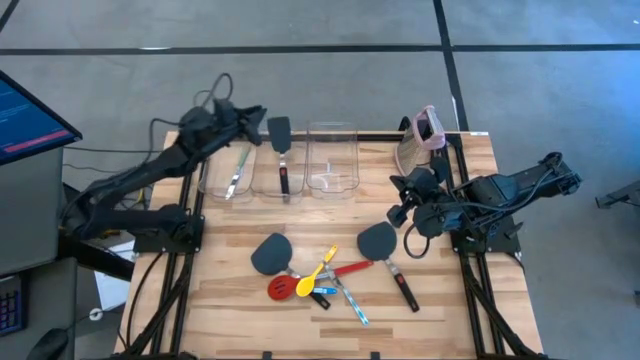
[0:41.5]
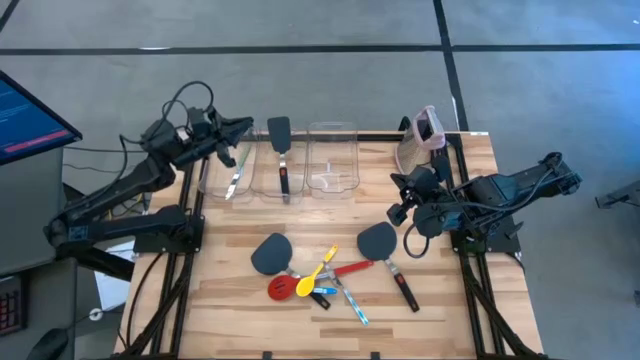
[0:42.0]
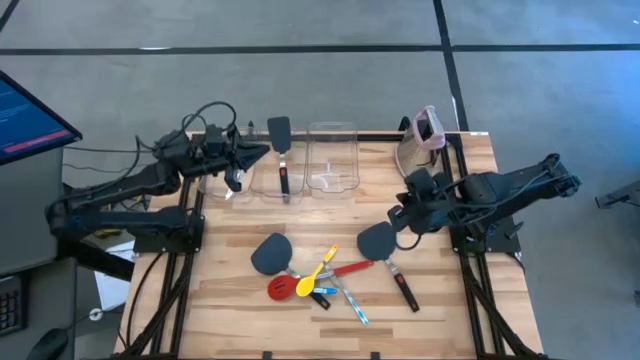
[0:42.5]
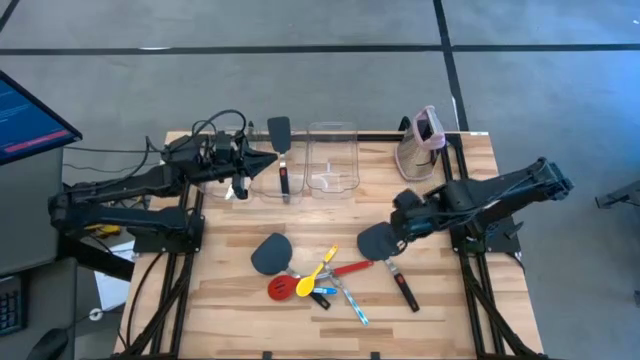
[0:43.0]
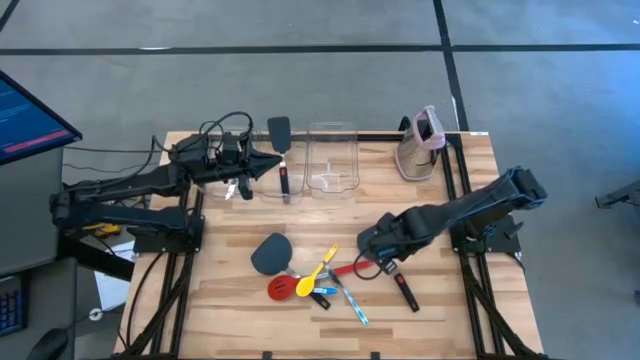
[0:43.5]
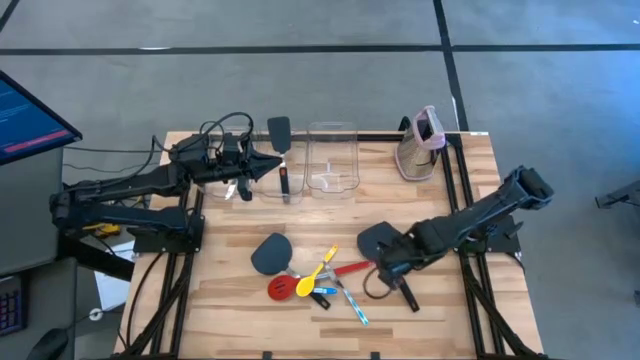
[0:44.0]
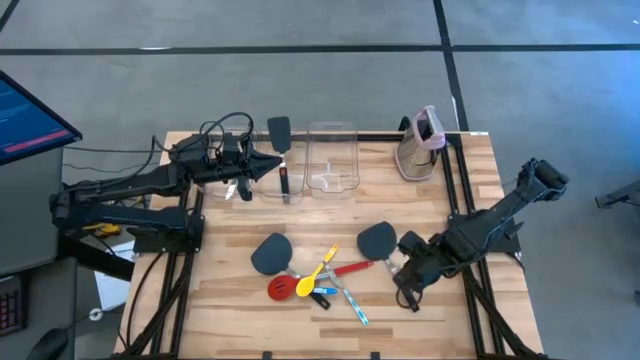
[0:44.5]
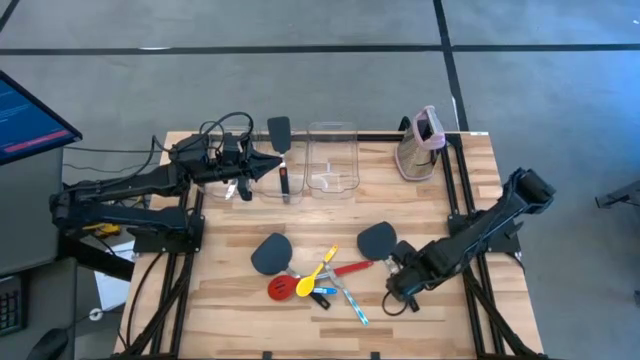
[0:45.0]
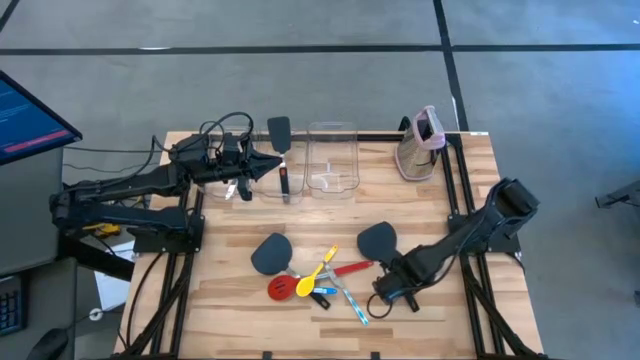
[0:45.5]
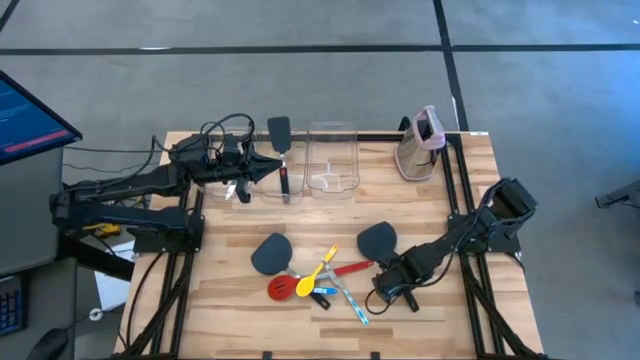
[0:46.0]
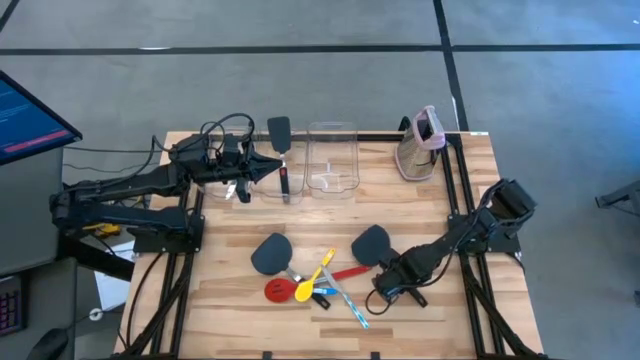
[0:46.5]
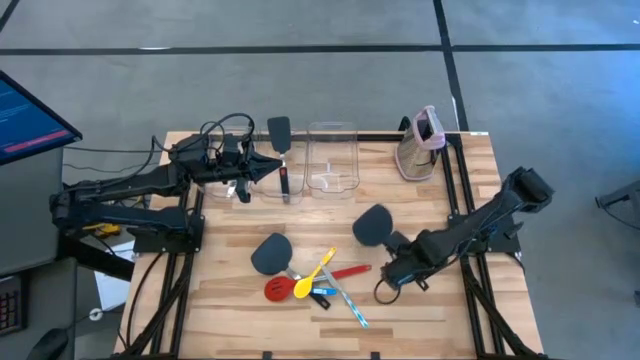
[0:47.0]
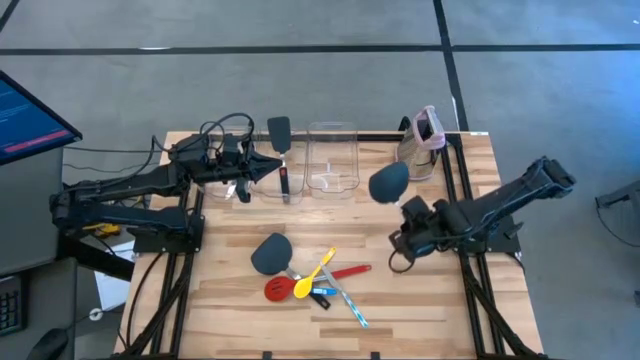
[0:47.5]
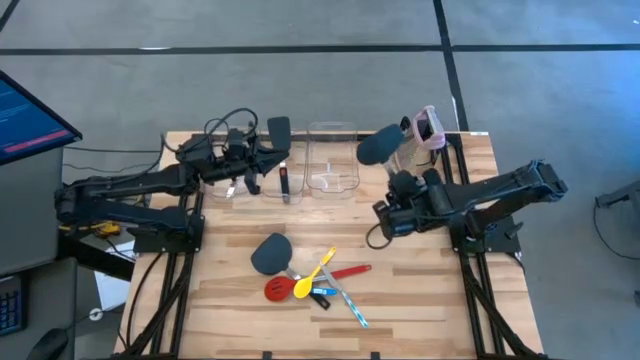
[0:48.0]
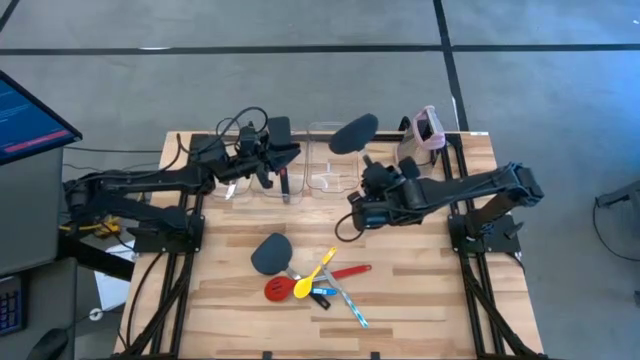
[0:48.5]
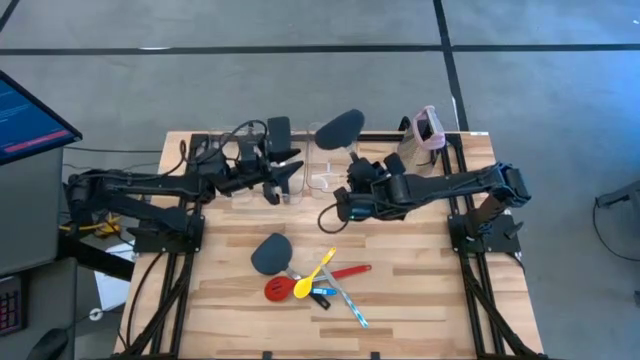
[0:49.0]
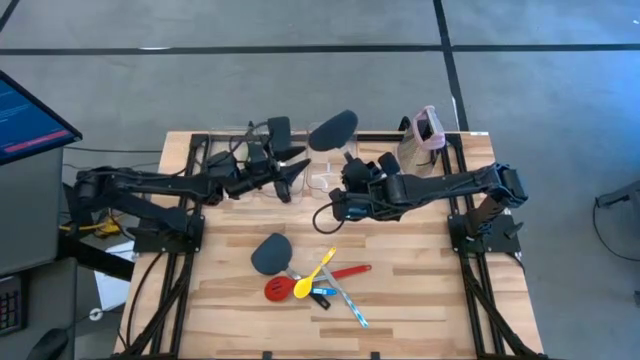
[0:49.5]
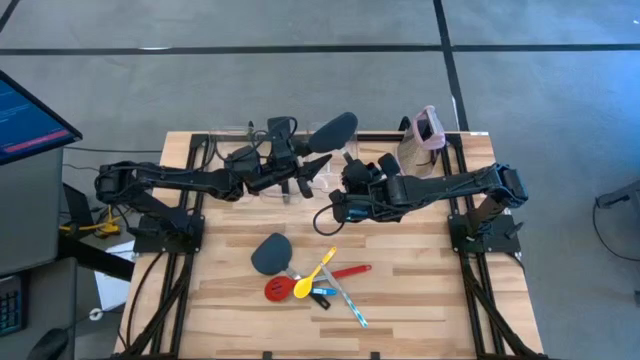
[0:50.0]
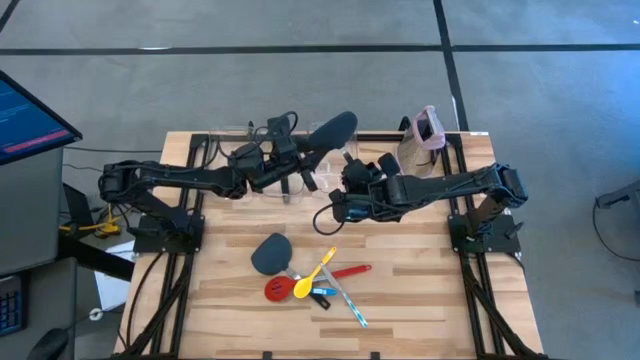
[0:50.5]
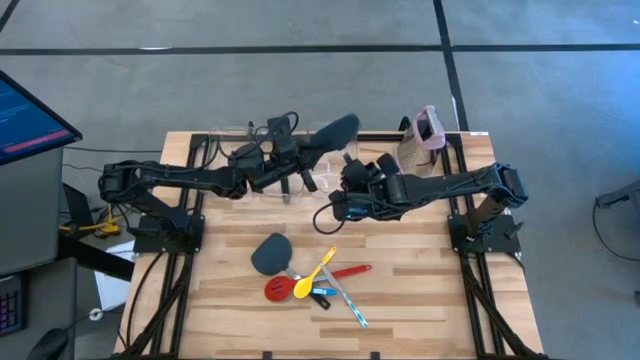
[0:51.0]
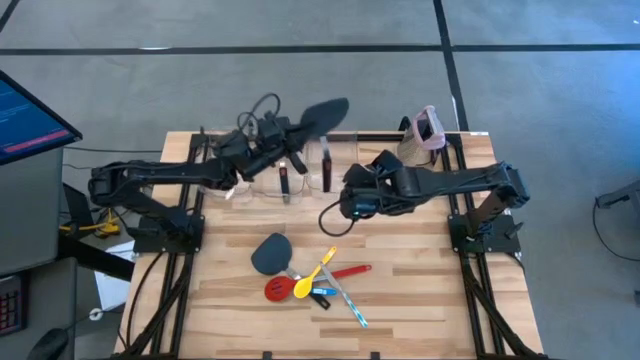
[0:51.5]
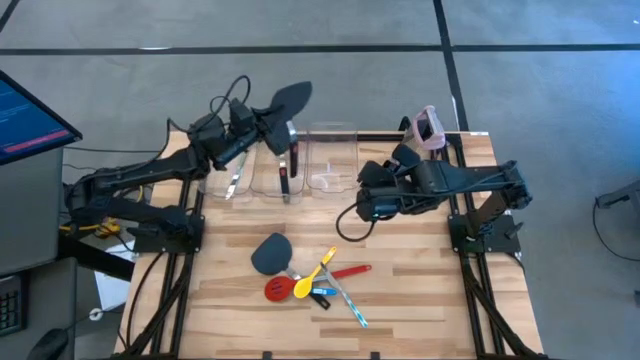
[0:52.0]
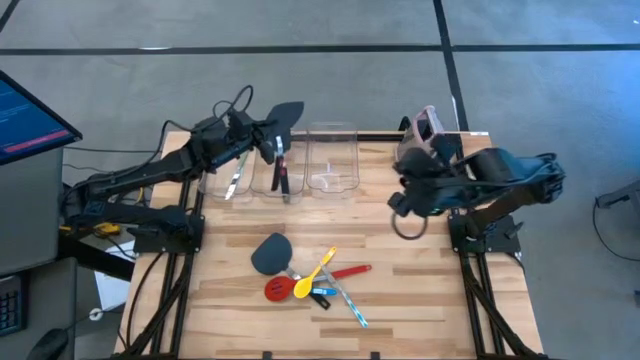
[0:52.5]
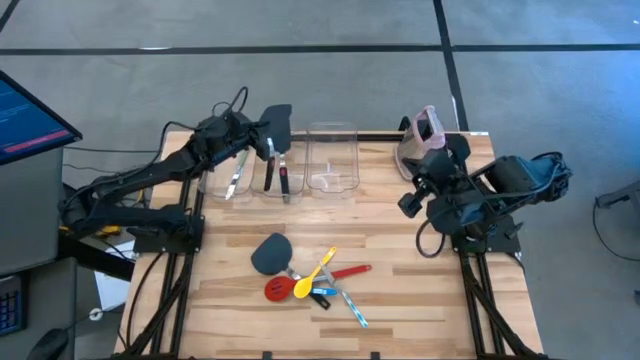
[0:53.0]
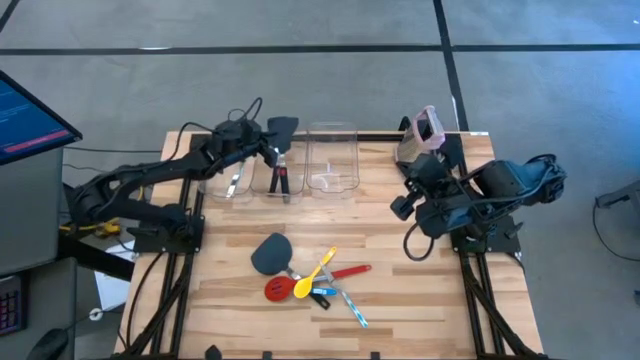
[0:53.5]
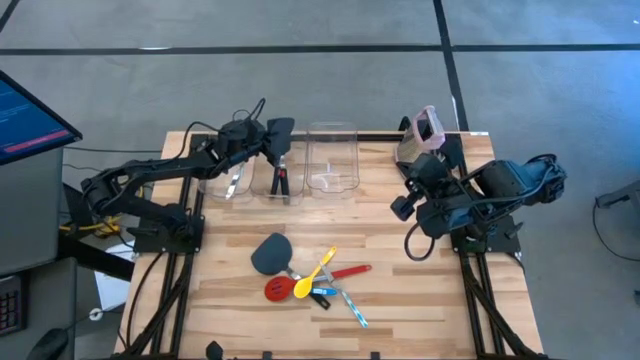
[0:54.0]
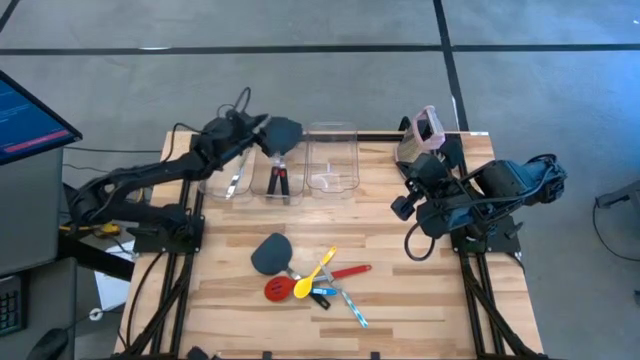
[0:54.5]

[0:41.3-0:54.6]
Task: Pick & Place Kitchen Items
Put the black spatula into the middle transparent bin

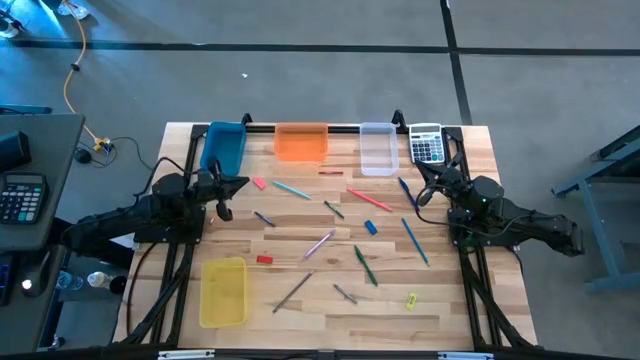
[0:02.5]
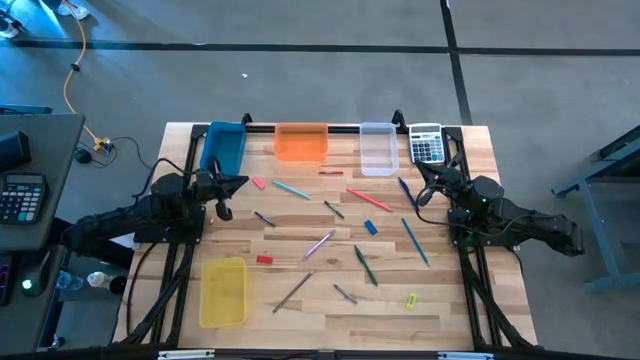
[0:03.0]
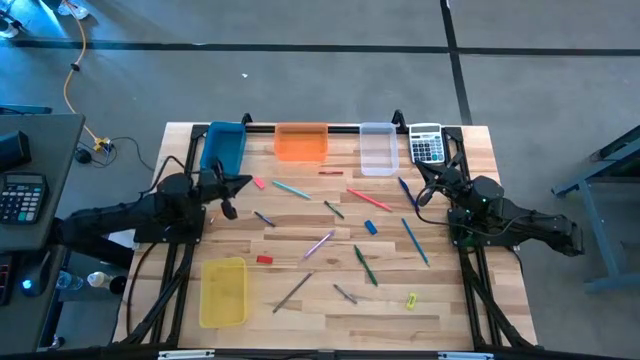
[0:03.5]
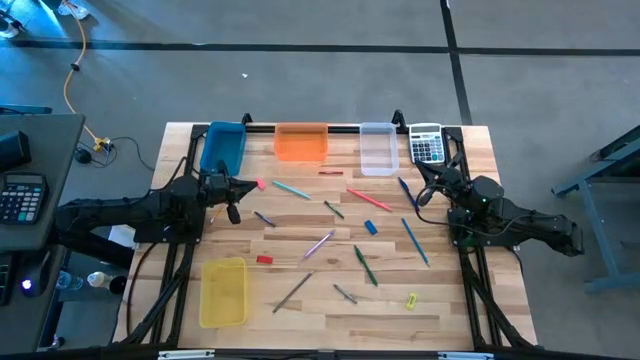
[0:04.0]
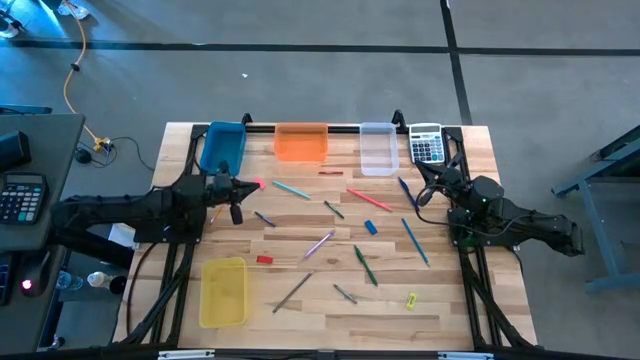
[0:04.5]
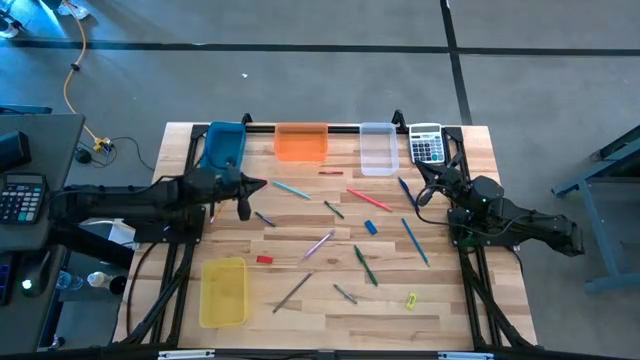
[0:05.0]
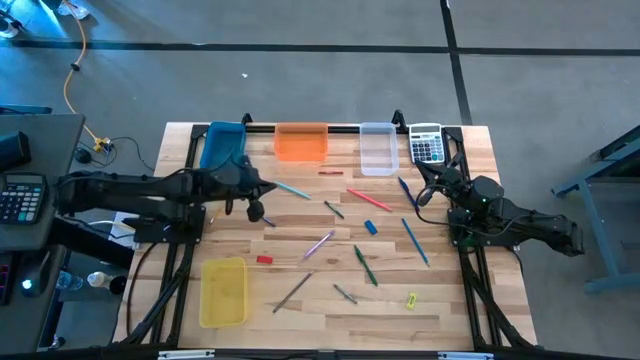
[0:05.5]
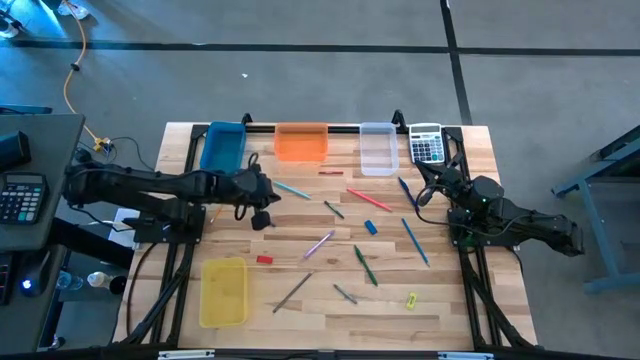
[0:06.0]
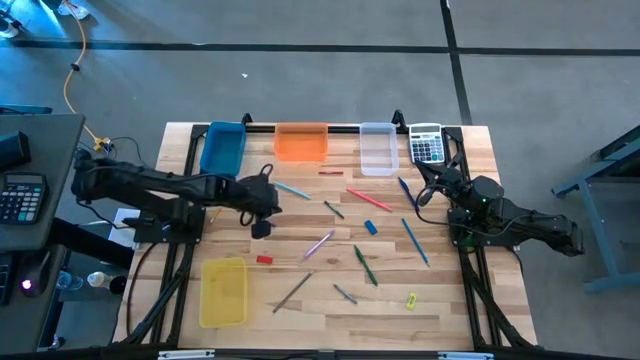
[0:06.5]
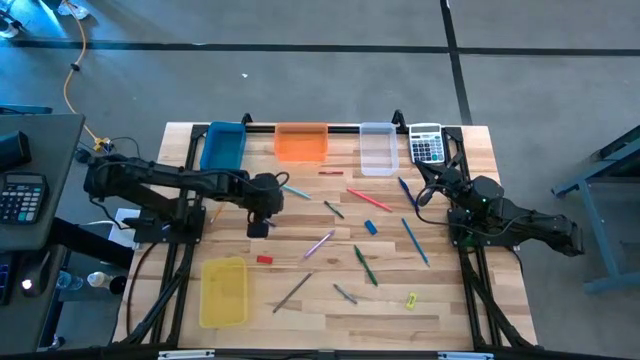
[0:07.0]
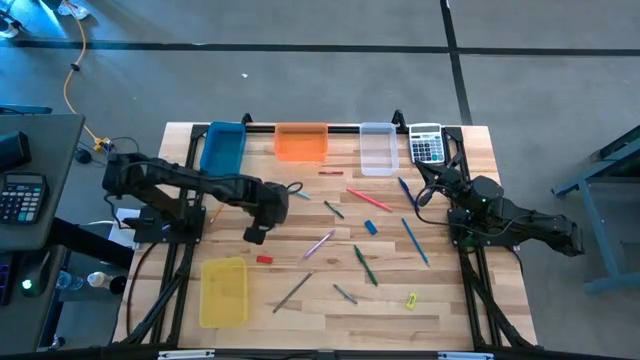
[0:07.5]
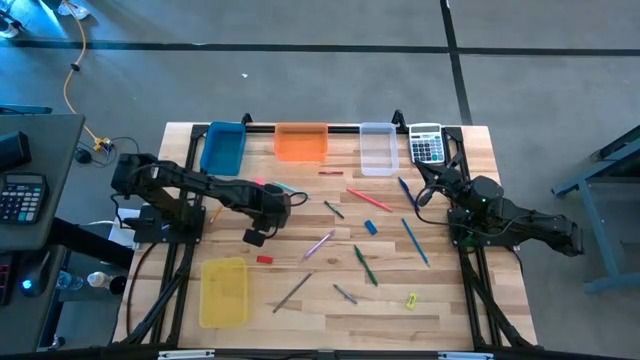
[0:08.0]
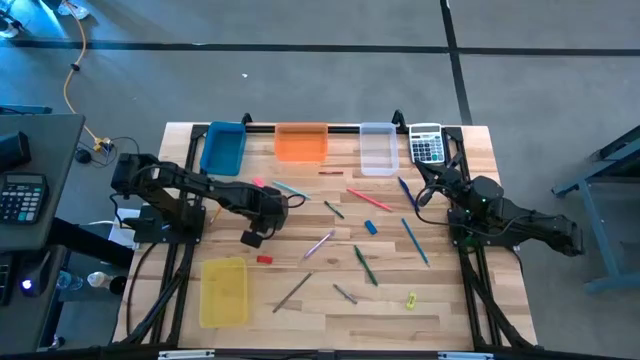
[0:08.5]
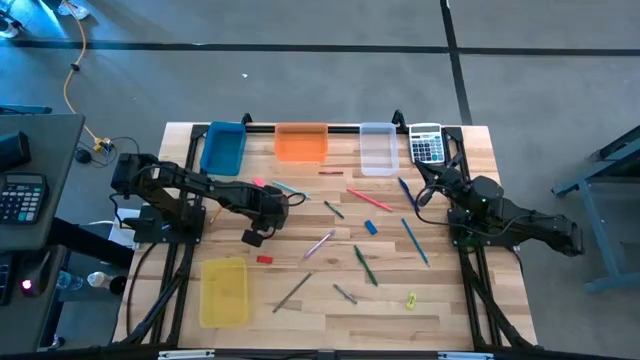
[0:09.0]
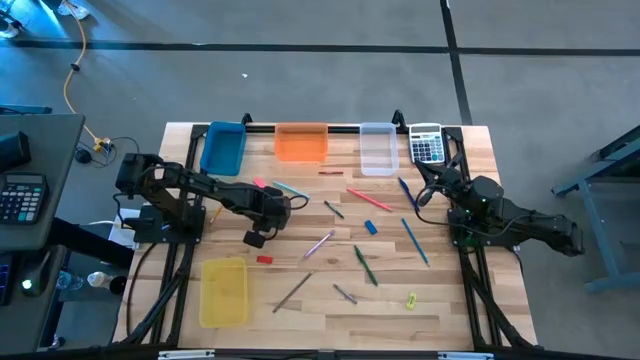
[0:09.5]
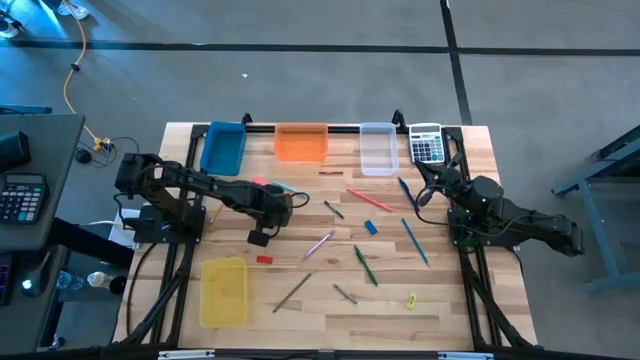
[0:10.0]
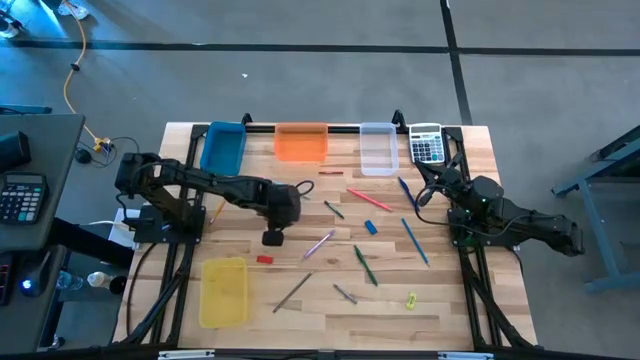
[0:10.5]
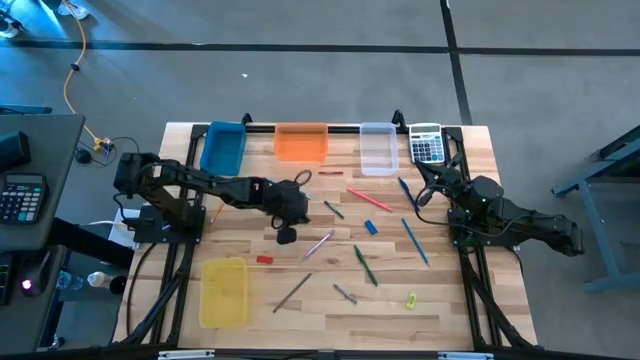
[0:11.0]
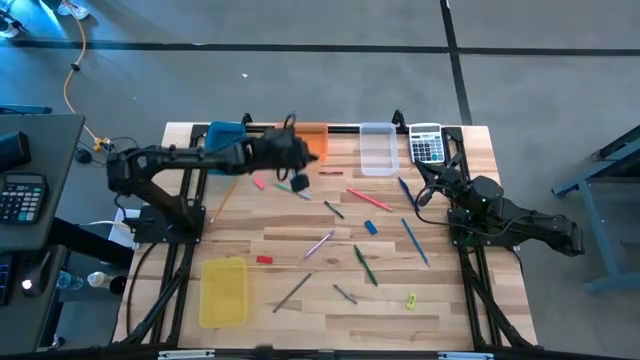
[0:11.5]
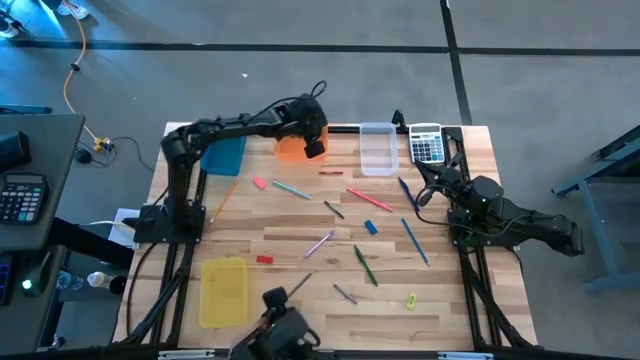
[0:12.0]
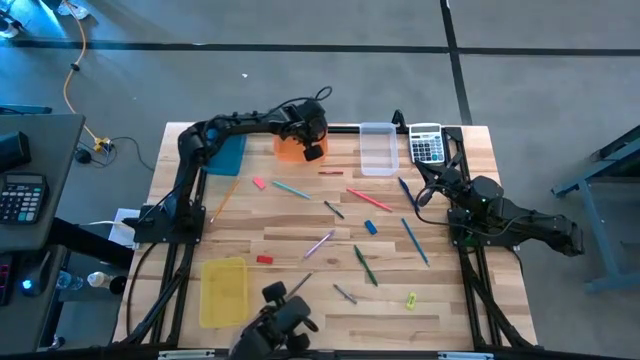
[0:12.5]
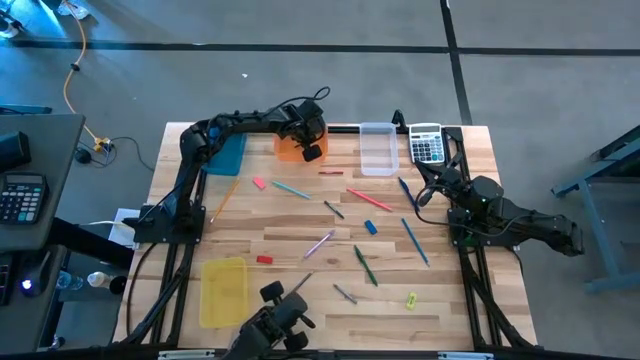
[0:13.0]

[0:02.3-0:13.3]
Task: Sort crayons/erasers/pens/pencils in bins
Put the blue crayon into the orange bin
